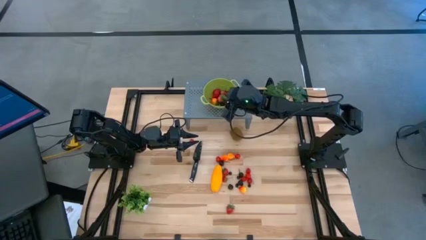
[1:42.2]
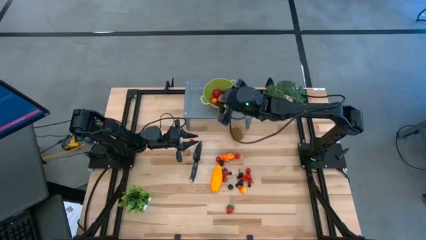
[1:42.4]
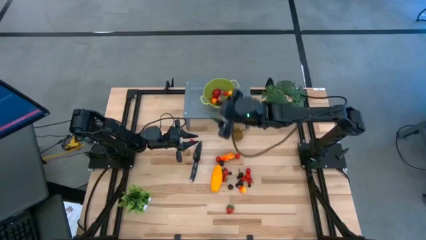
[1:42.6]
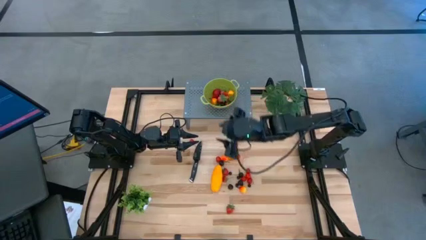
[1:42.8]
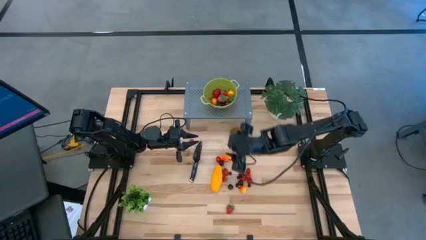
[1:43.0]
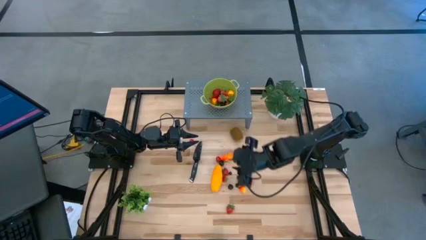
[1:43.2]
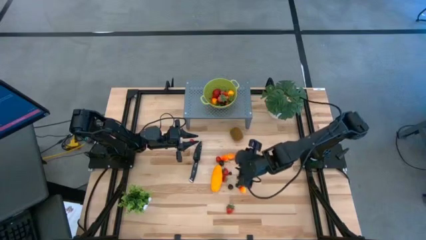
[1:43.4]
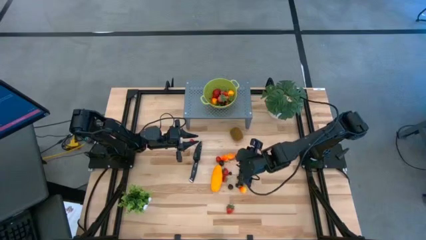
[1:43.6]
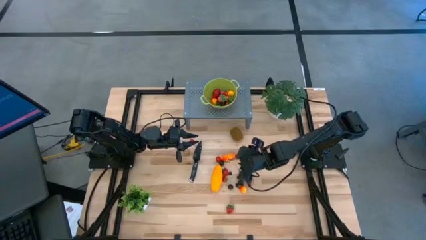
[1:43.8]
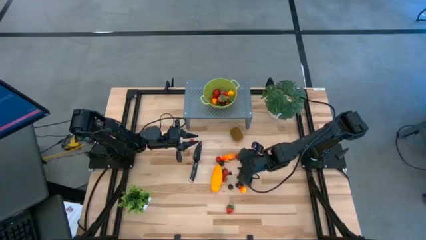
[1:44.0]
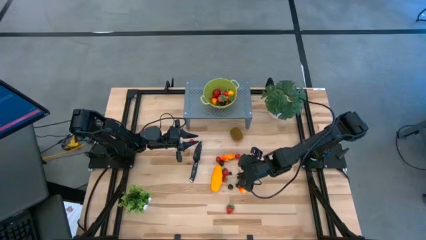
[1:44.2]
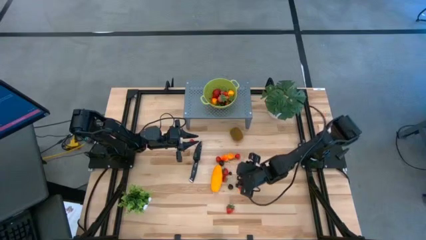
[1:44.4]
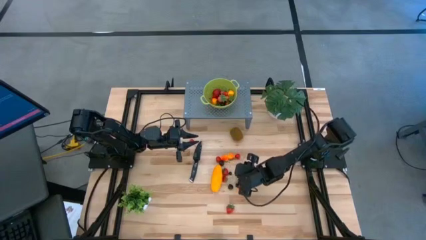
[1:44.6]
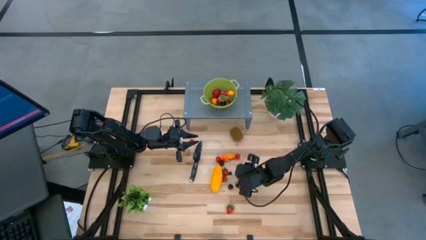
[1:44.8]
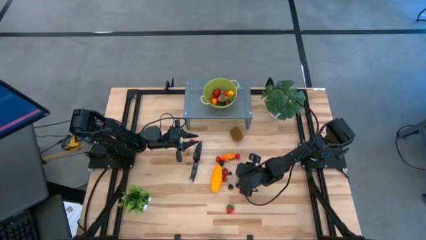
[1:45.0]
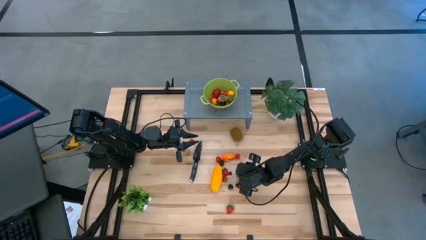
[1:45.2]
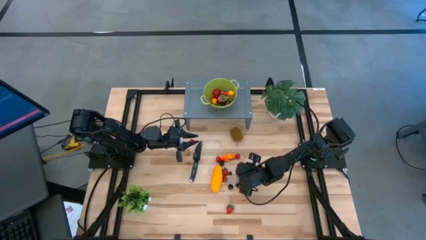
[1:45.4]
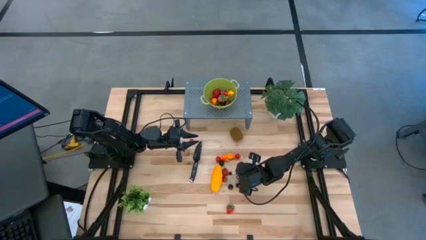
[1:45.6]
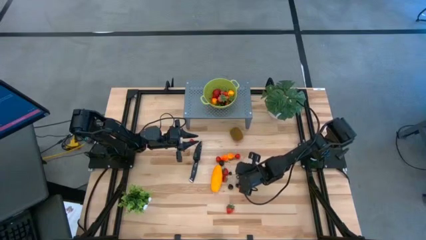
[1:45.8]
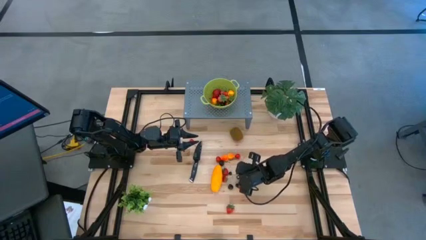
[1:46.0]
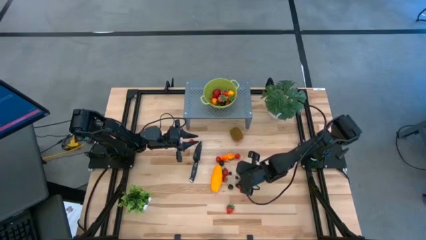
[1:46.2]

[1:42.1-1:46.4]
Task: Pick & Place Fruit
Put the blackberry into the green strainer bowl on the shelf

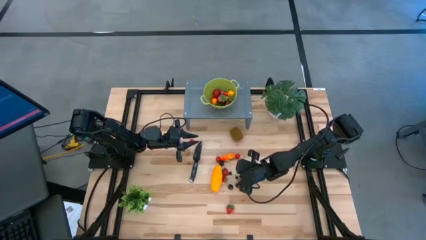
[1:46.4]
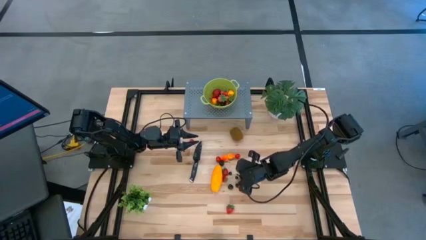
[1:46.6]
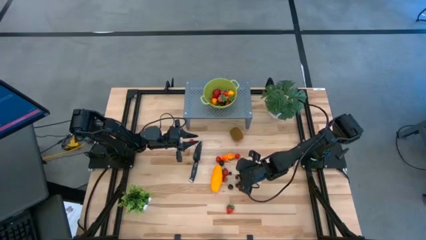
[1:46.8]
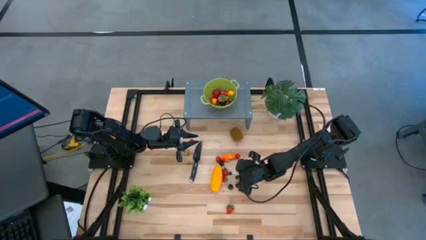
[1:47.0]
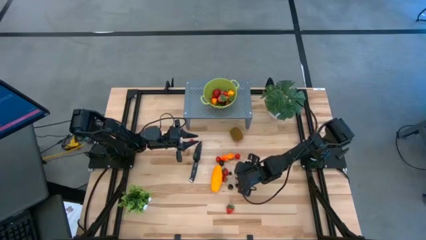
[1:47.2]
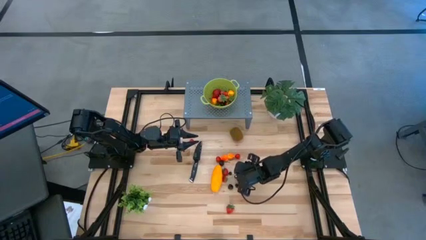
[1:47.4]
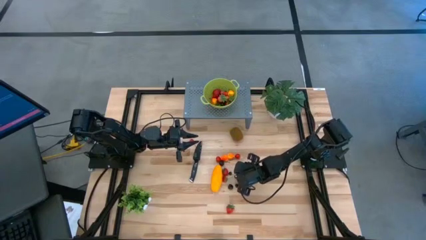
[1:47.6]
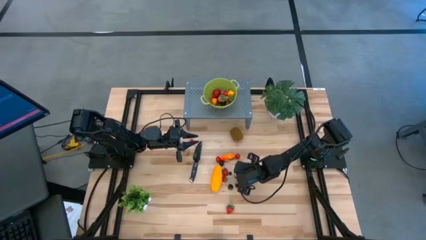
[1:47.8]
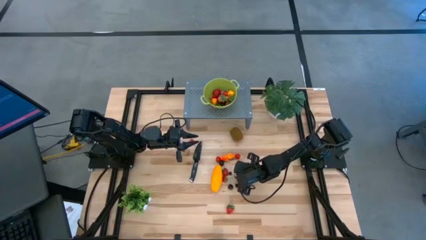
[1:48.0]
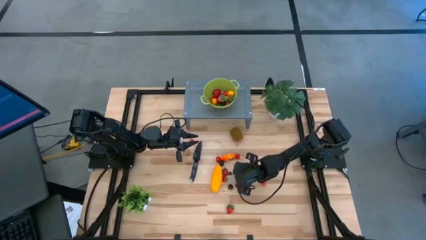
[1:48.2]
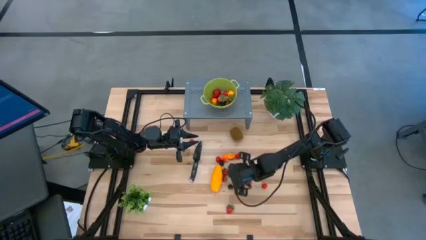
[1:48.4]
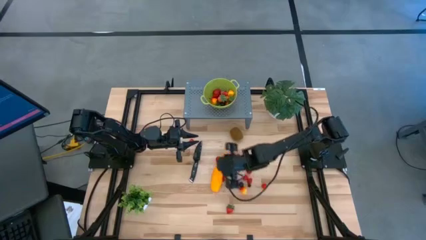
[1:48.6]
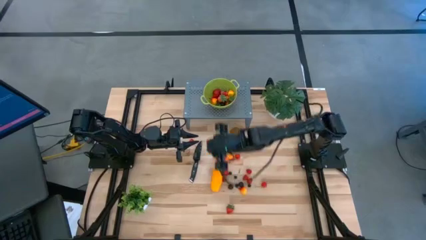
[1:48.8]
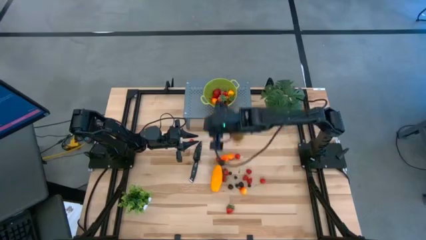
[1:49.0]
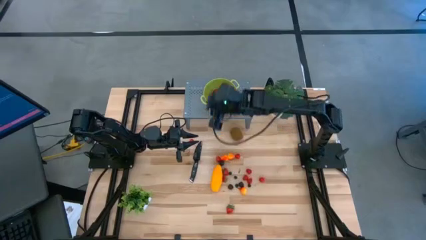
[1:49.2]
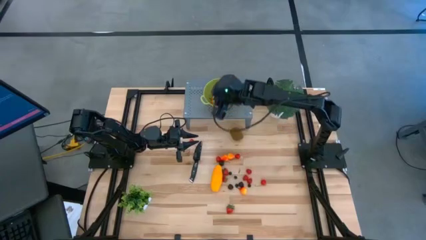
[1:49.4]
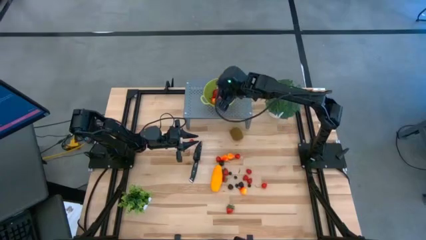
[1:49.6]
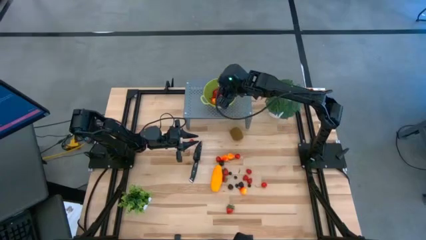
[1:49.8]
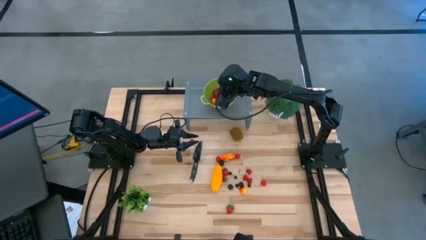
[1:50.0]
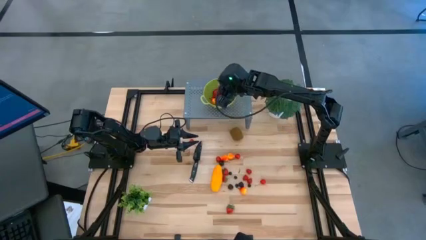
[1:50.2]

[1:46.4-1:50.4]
Put the blackberry into the green strainer bowl on the shelf

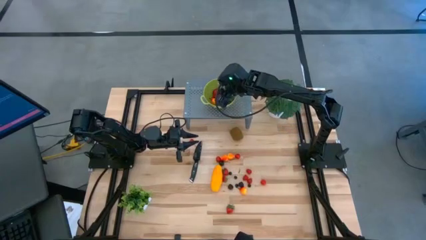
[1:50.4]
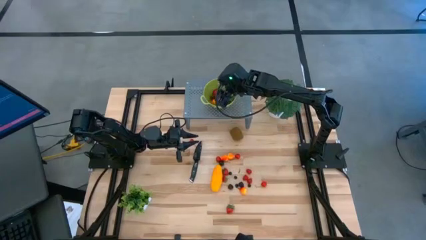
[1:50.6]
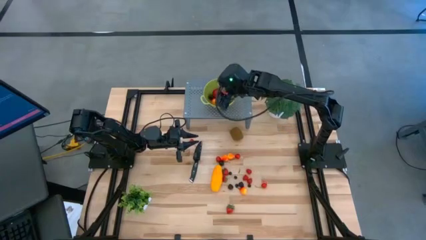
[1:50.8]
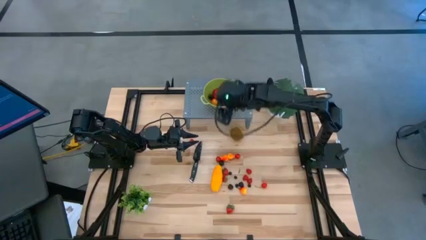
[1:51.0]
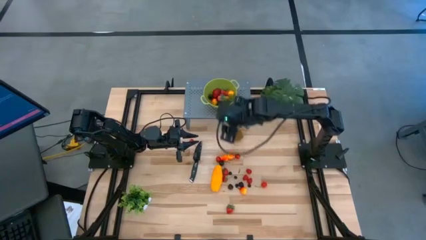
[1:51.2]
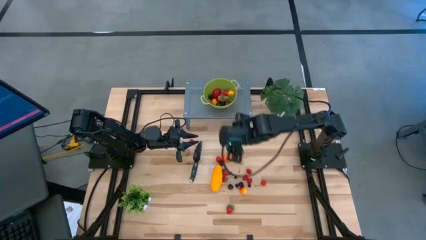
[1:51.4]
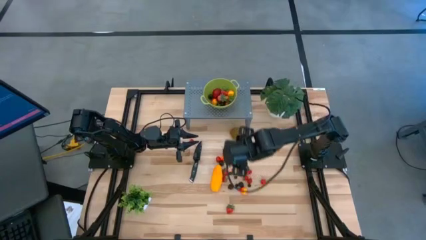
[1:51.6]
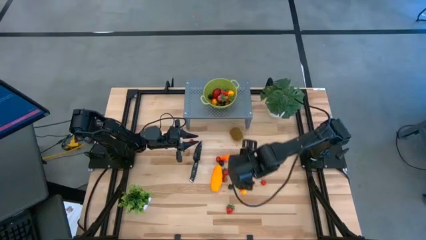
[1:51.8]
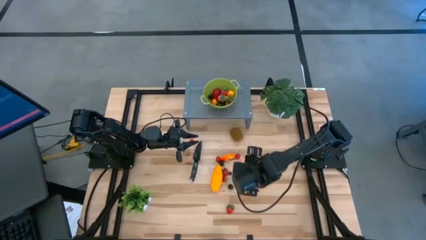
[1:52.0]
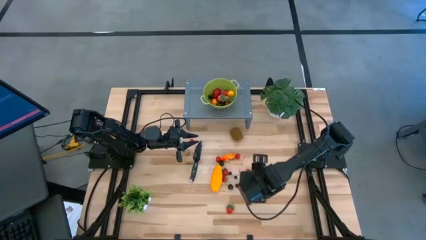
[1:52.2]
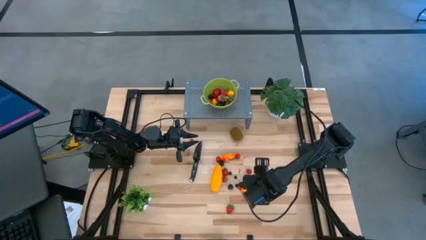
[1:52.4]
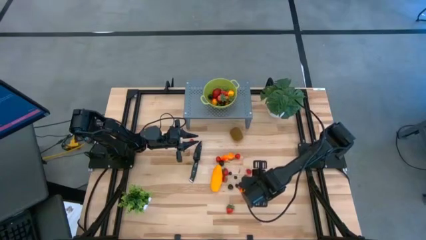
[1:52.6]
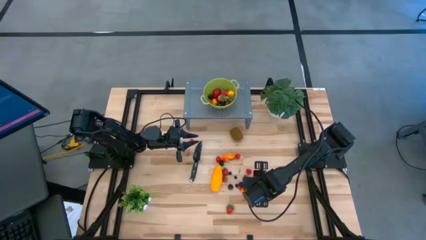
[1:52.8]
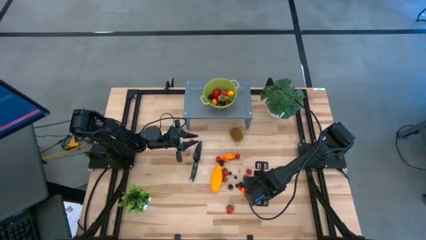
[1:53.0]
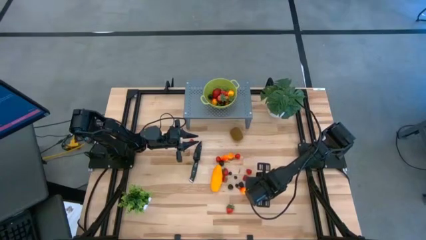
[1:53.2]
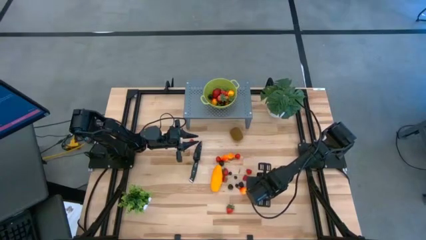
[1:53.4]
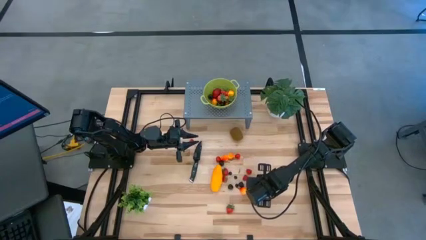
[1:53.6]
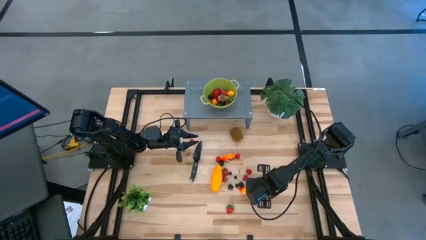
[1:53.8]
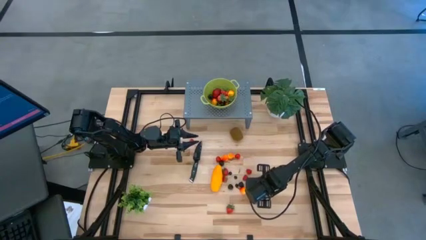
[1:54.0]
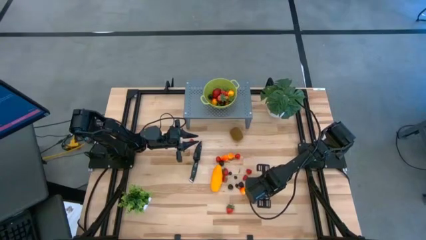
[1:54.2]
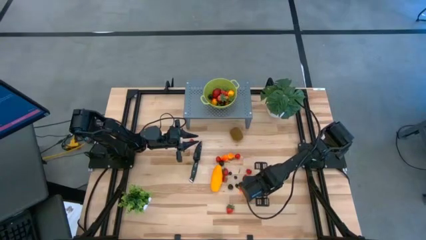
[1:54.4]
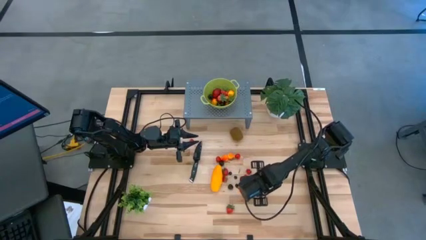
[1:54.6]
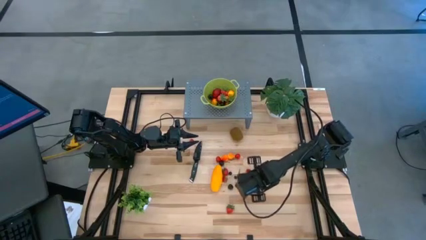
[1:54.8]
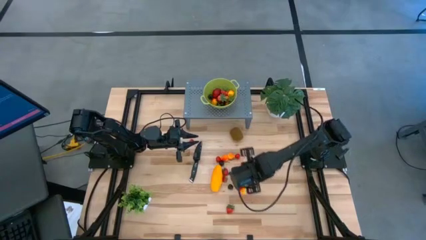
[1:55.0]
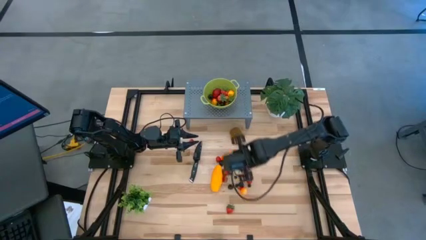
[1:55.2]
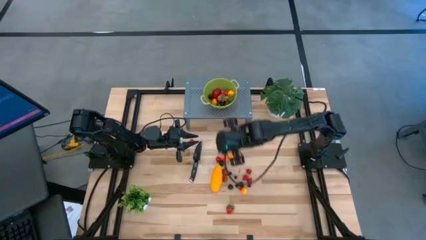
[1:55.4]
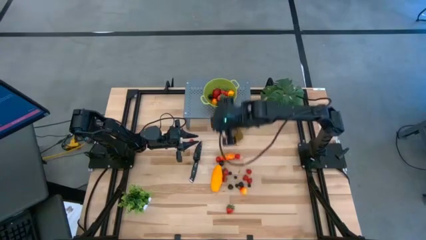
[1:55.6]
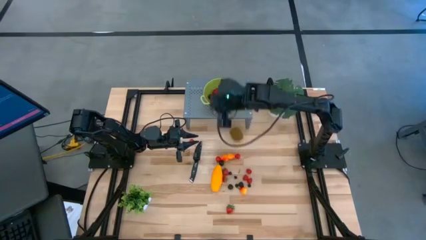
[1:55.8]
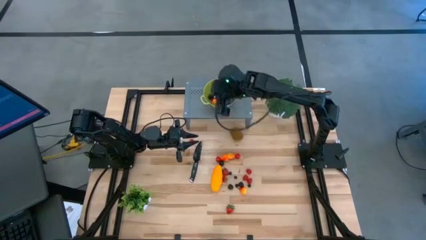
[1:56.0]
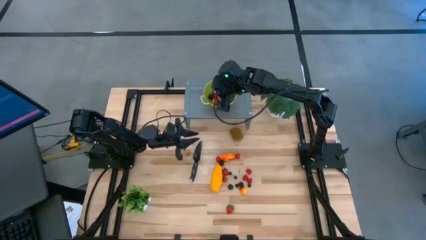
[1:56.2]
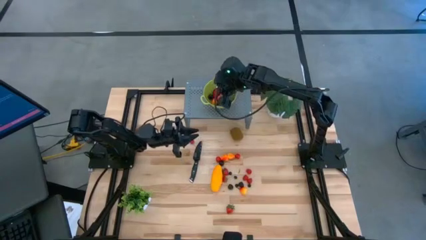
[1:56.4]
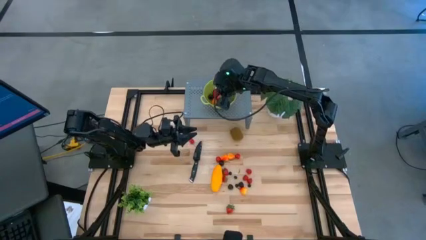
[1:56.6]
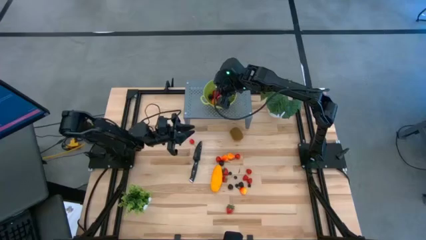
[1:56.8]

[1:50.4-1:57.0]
Put the red cherry into the green strainer bowl on the shelf

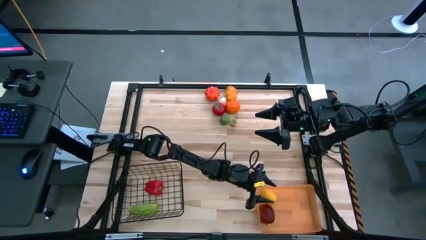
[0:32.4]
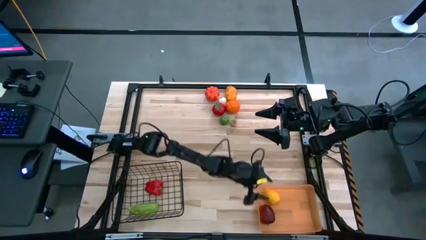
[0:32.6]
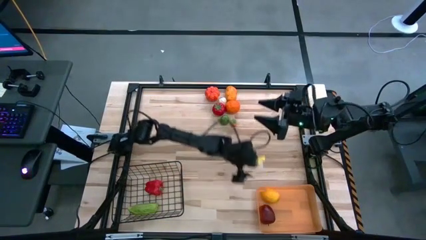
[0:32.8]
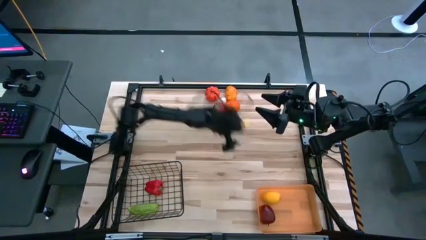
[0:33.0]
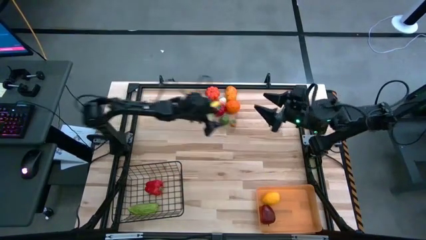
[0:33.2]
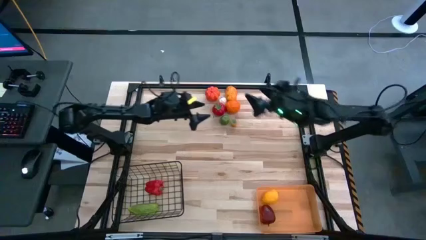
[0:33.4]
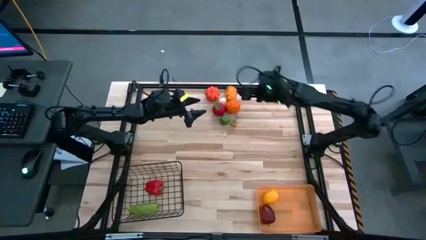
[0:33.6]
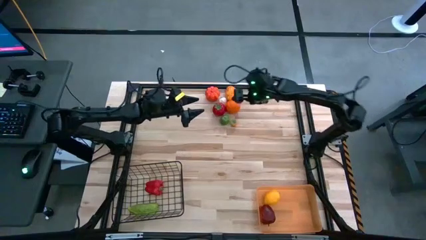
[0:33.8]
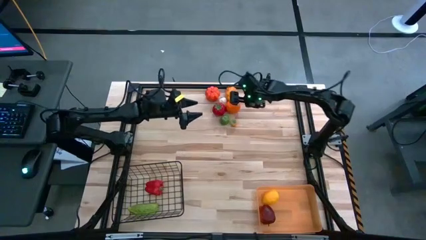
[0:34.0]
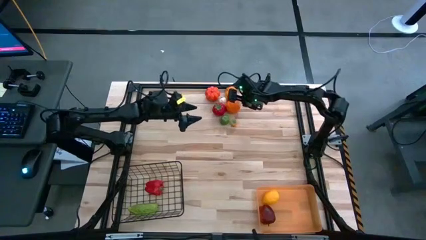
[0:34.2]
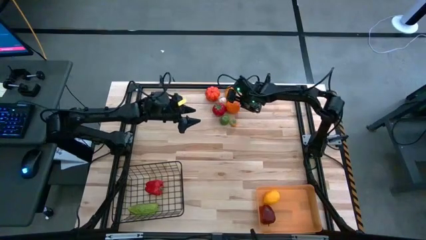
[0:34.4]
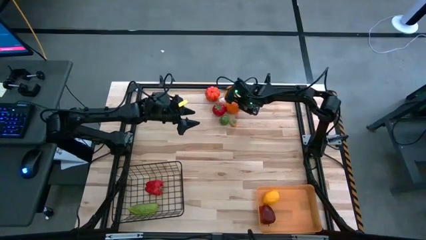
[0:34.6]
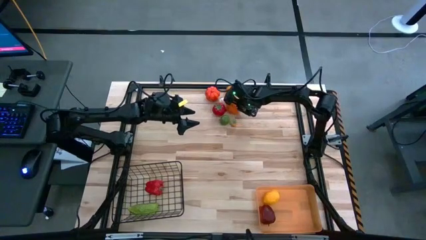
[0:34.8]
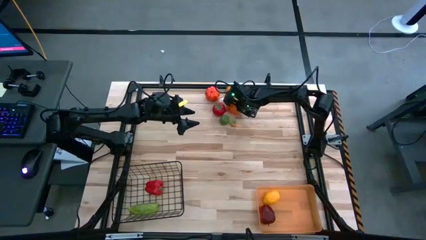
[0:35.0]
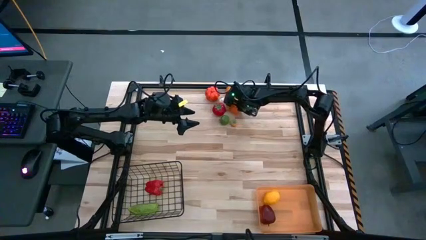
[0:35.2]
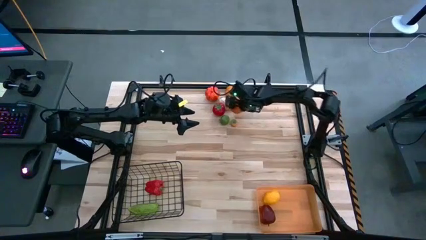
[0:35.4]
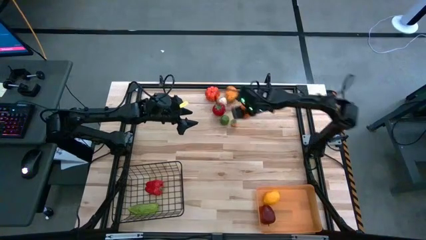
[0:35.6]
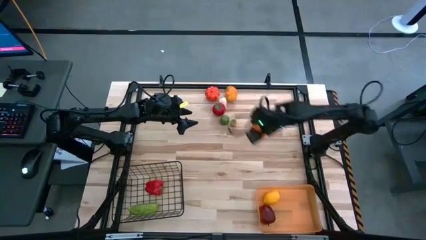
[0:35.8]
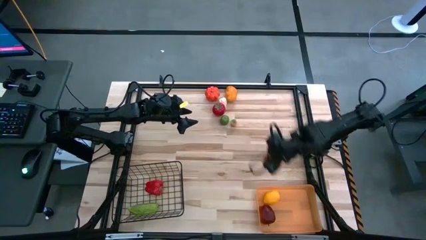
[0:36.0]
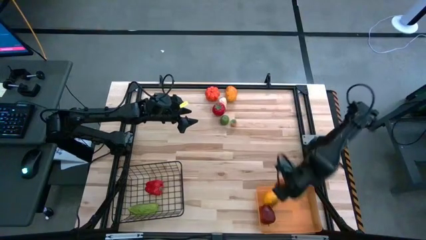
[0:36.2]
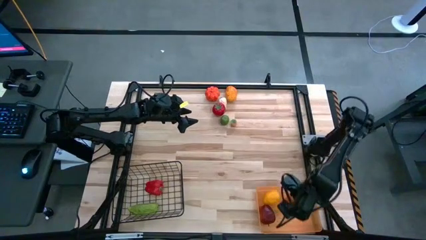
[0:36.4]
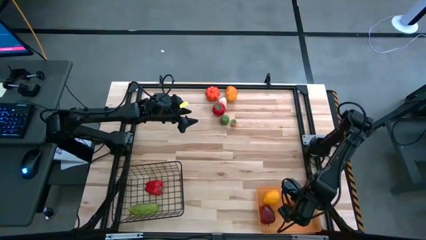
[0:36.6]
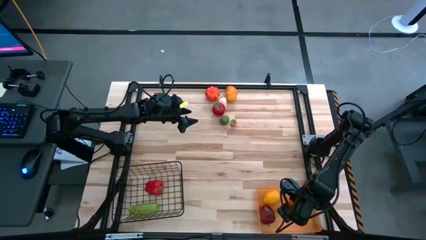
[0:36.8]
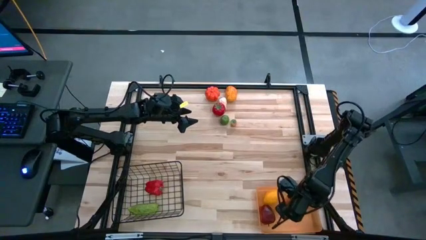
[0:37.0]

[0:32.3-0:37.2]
Task: Sort produce into baskets
Put the orange into the orange bin
